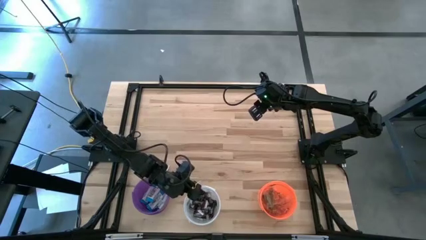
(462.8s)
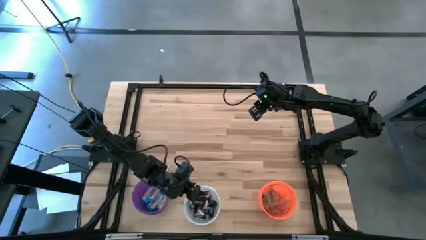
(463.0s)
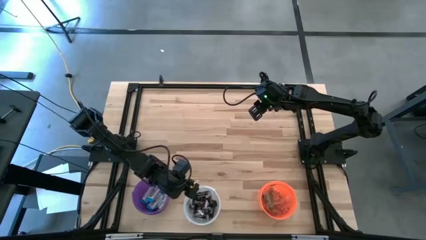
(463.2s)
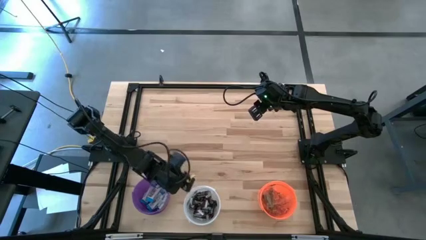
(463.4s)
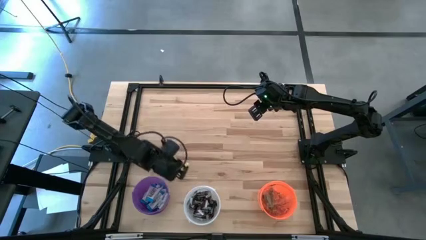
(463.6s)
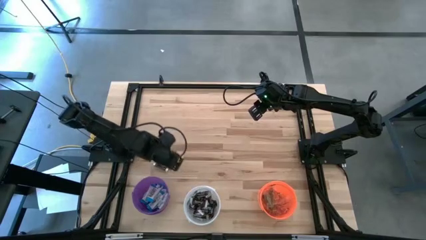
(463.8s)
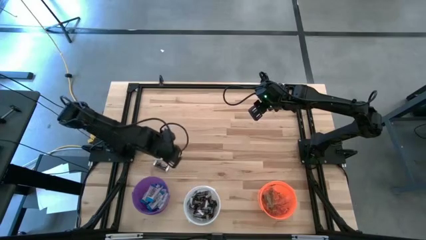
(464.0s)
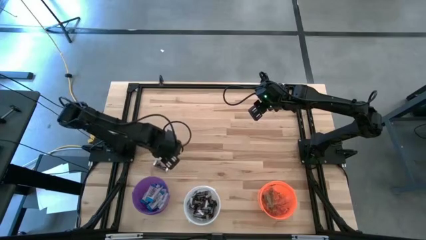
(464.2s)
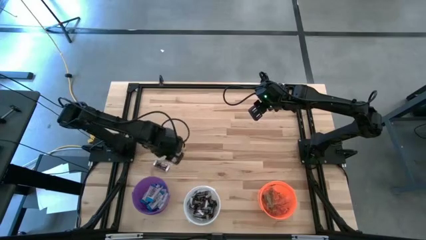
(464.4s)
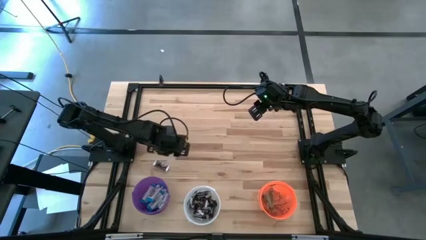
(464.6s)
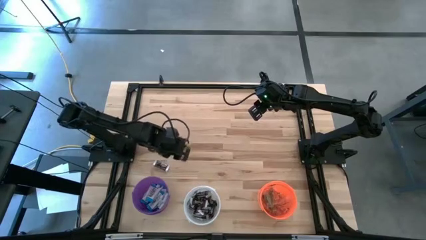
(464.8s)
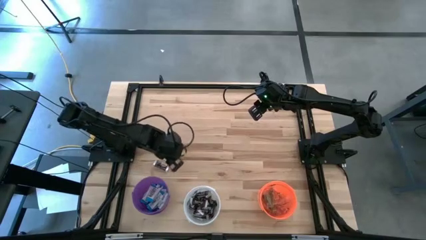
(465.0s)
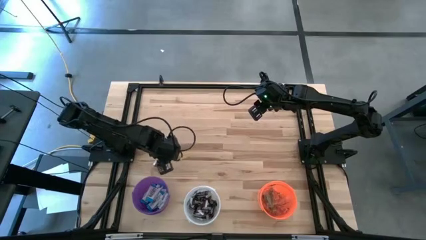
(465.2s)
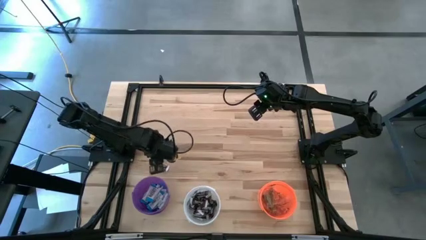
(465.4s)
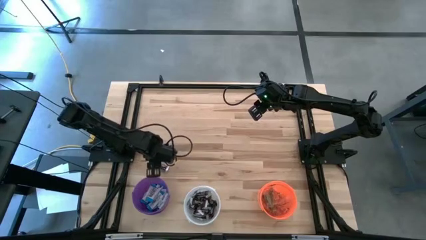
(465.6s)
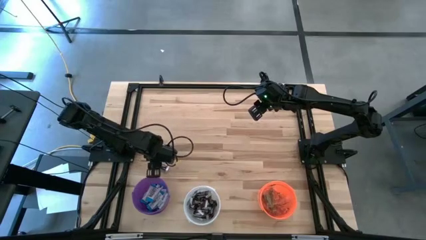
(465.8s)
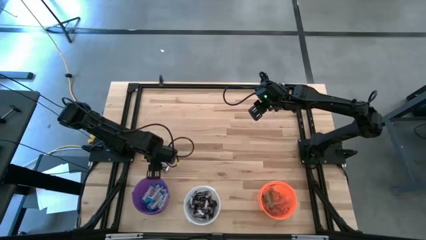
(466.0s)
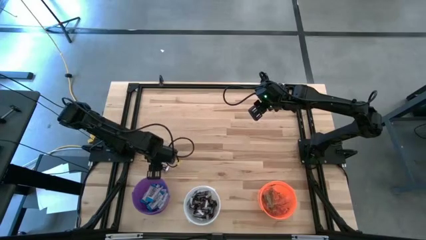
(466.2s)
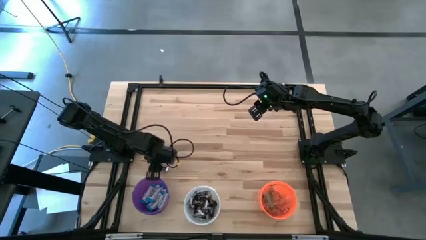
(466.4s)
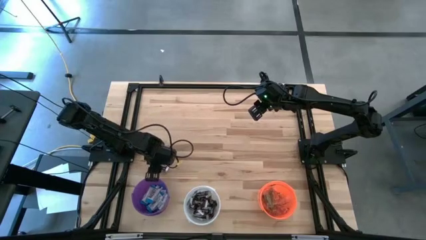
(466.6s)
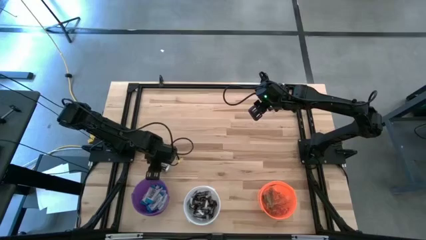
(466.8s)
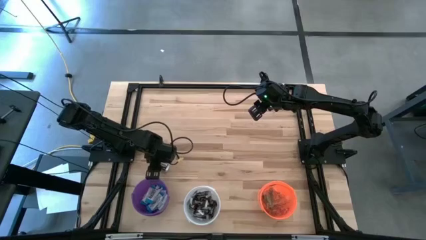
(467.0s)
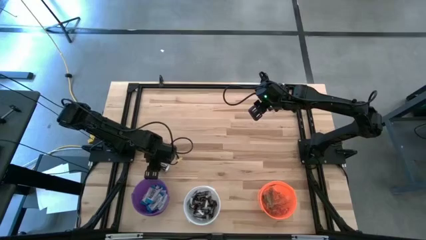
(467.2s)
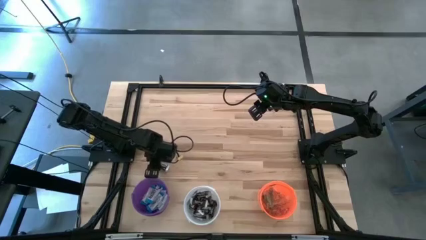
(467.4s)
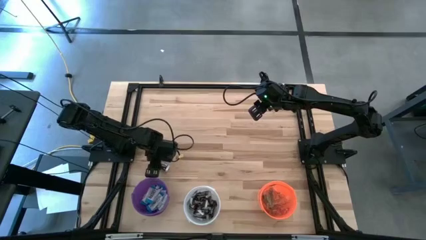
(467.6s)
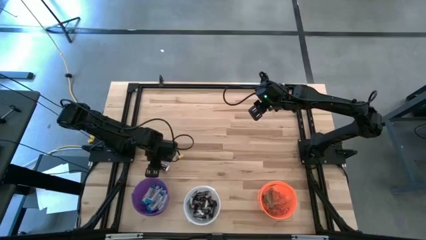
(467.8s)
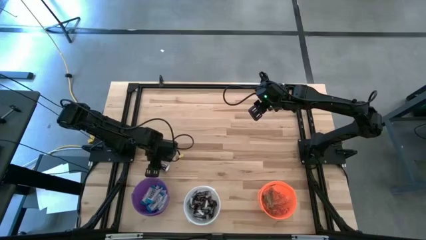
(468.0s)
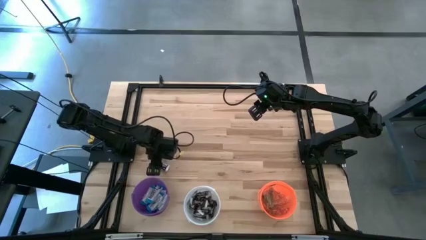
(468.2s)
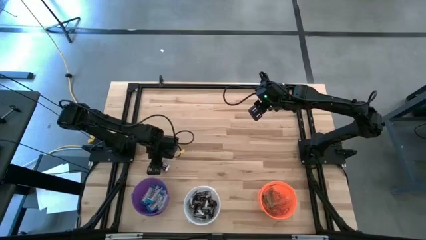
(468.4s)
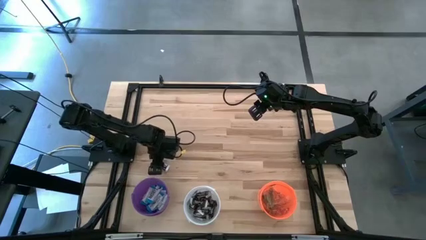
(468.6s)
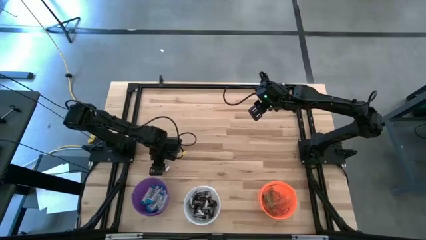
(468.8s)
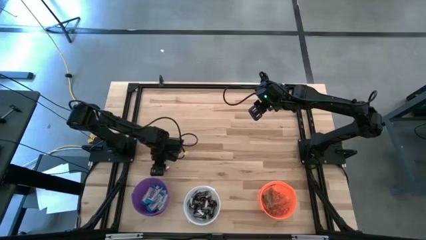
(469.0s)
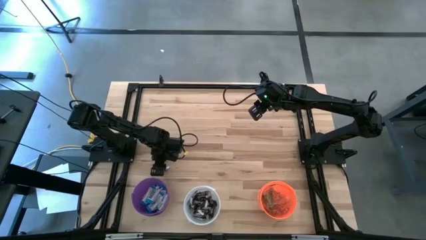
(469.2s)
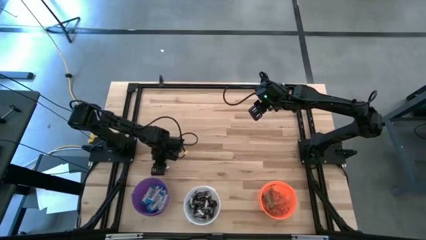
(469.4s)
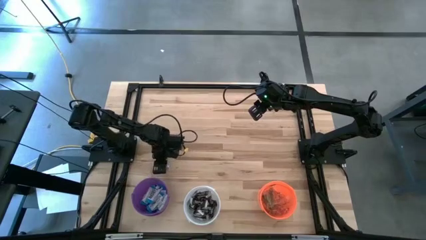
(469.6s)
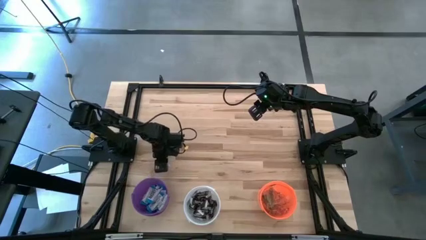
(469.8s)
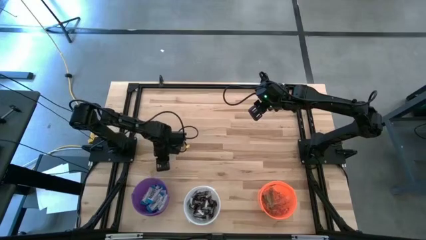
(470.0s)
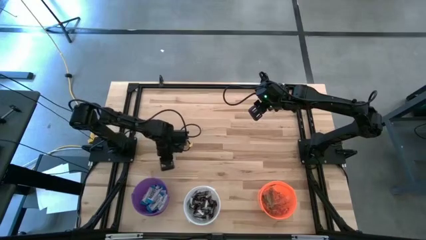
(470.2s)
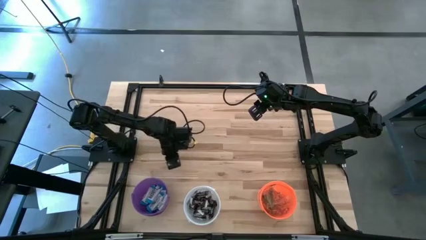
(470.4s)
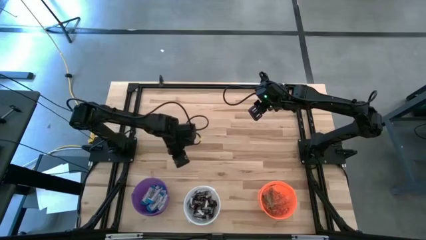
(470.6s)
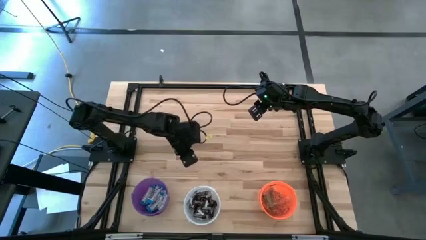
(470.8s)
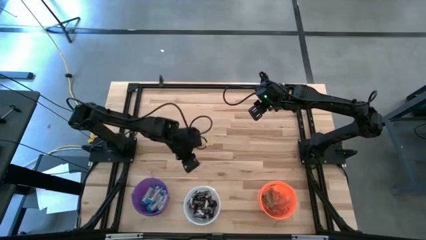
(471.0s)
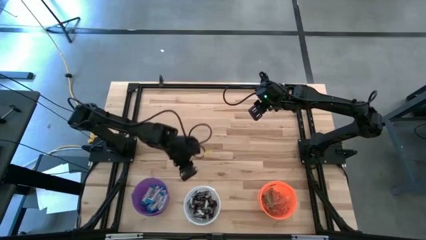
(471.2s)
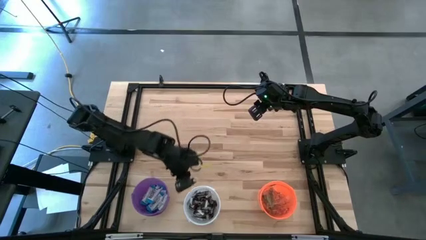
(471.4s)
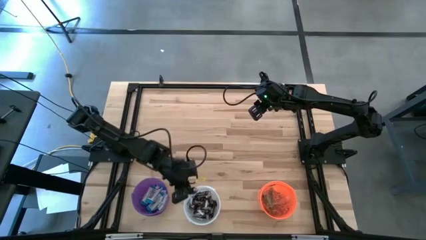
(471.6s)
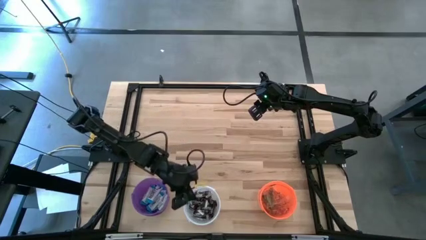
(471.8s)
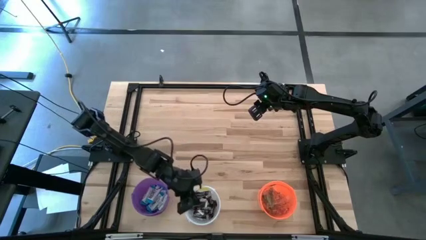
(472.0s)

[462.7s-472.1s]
Task: Sort candy
Put the brown chocolate into the white bucket

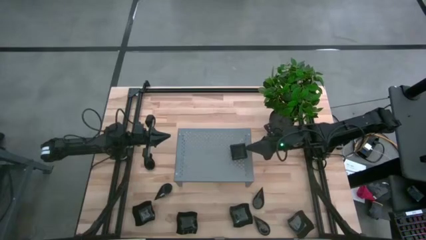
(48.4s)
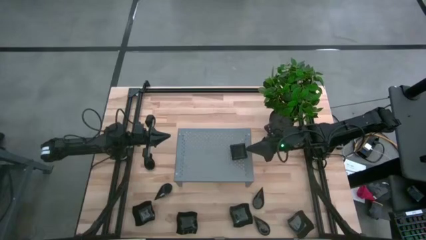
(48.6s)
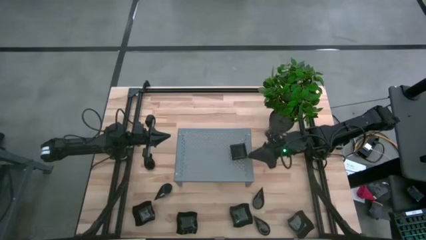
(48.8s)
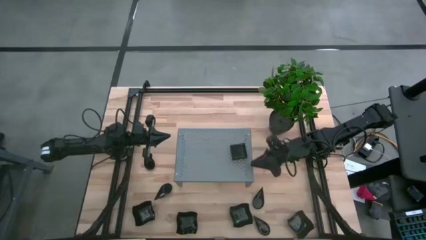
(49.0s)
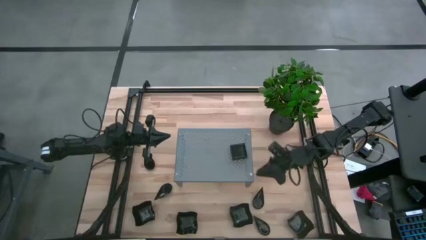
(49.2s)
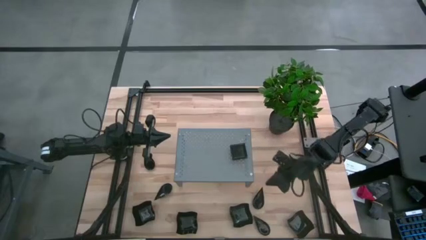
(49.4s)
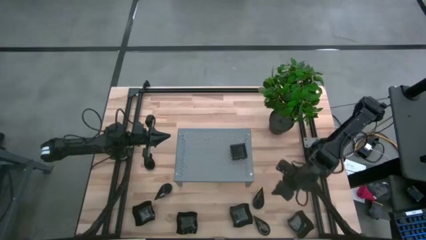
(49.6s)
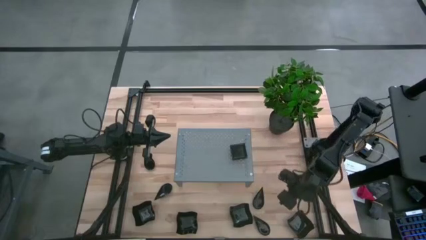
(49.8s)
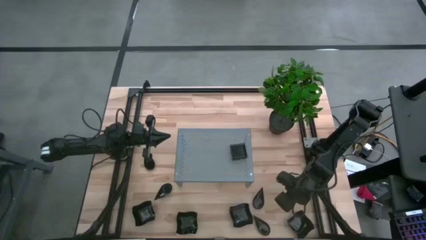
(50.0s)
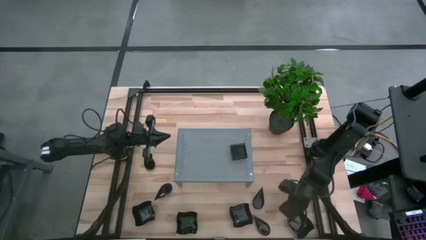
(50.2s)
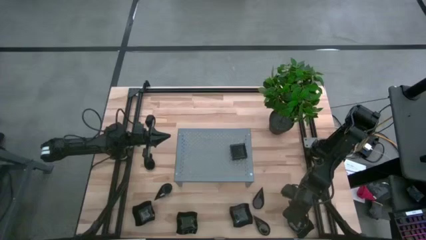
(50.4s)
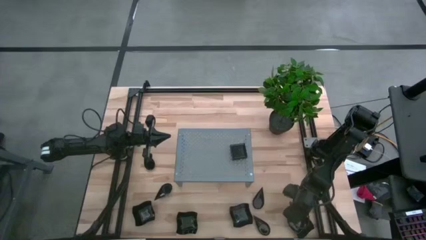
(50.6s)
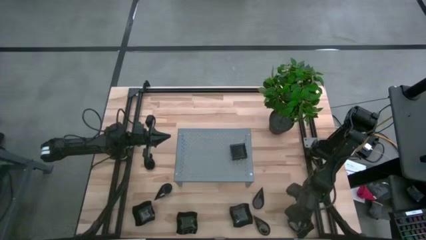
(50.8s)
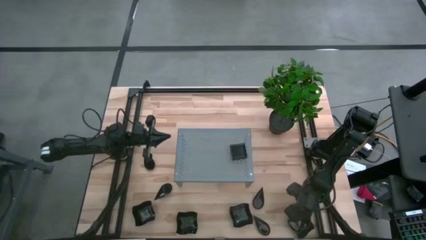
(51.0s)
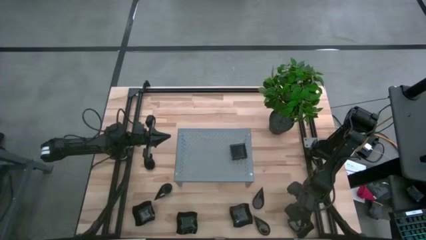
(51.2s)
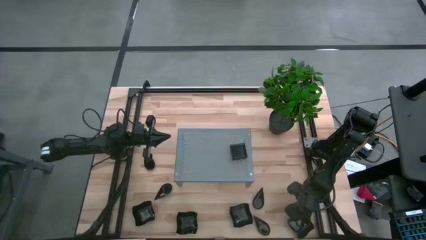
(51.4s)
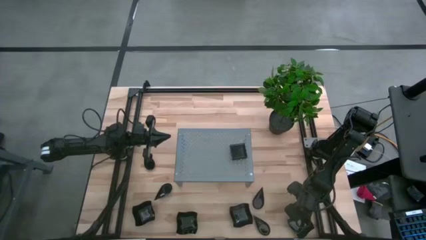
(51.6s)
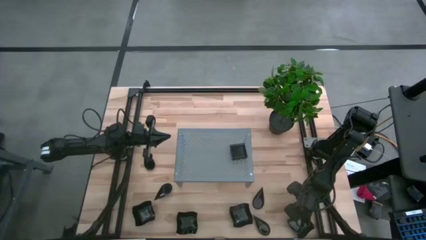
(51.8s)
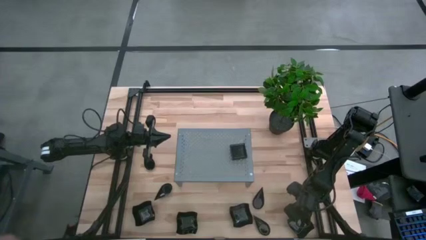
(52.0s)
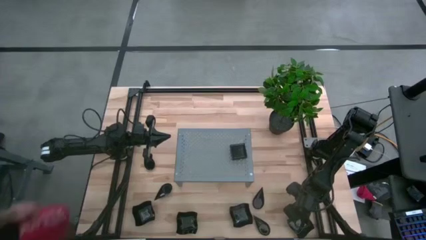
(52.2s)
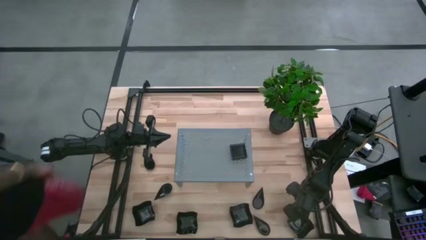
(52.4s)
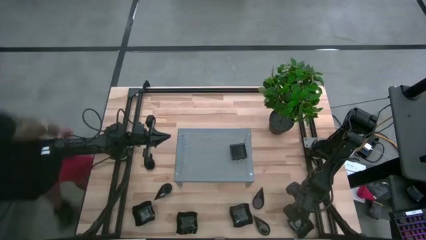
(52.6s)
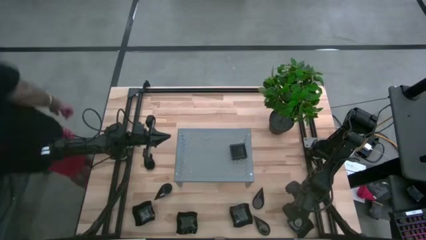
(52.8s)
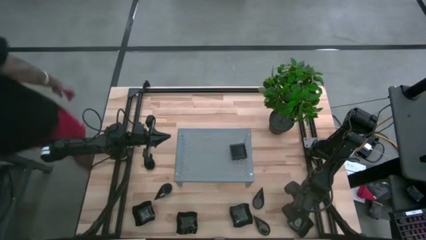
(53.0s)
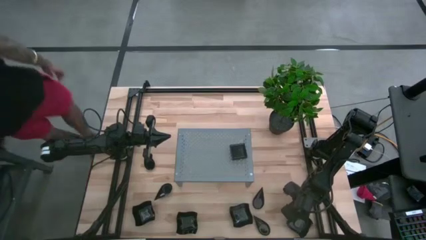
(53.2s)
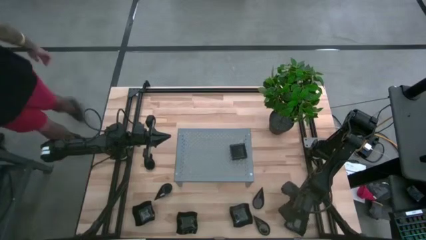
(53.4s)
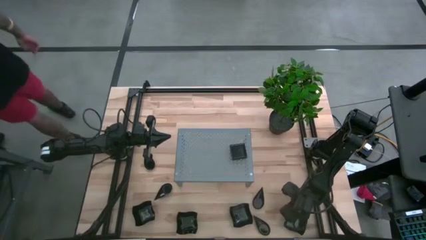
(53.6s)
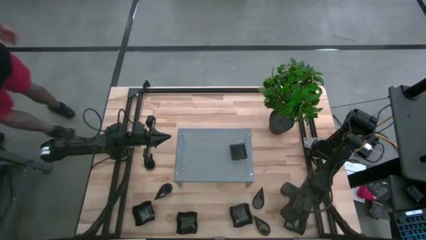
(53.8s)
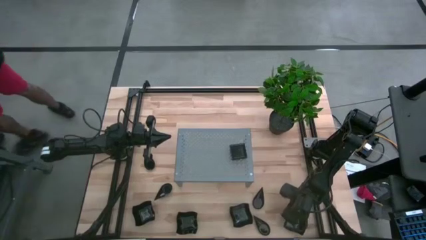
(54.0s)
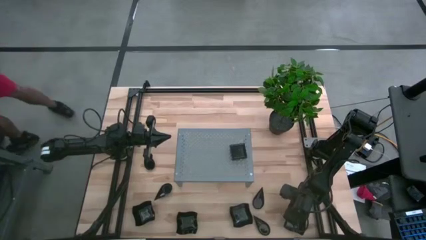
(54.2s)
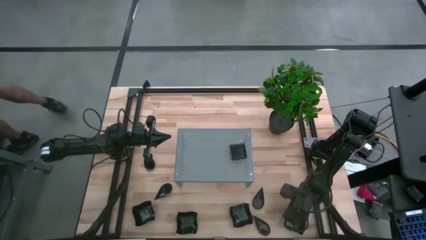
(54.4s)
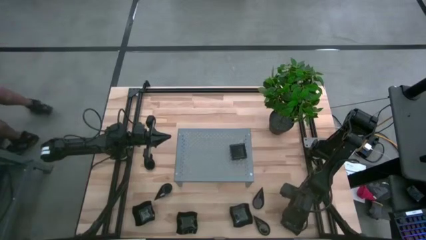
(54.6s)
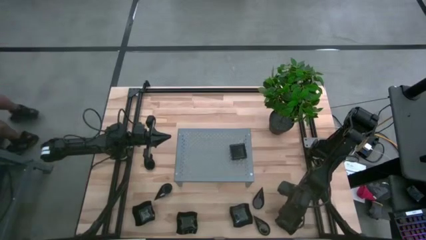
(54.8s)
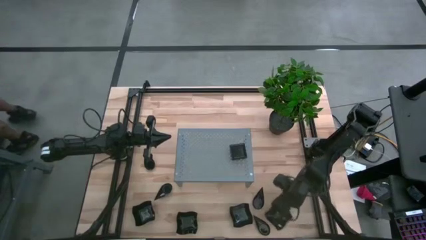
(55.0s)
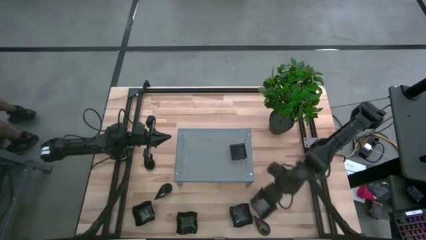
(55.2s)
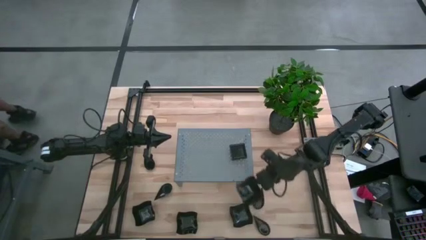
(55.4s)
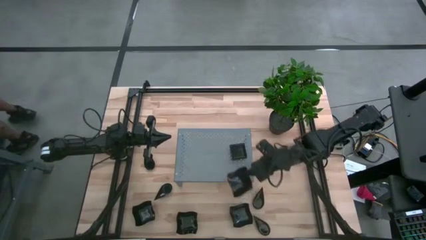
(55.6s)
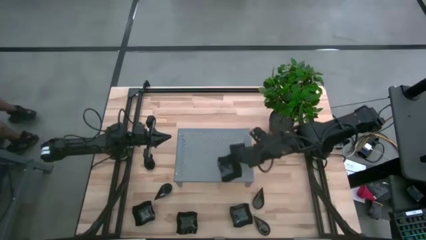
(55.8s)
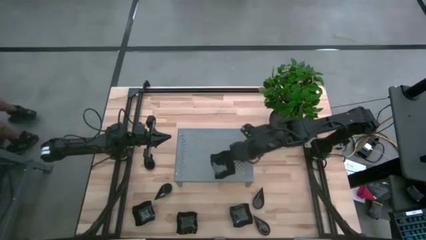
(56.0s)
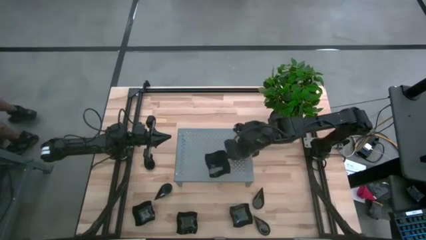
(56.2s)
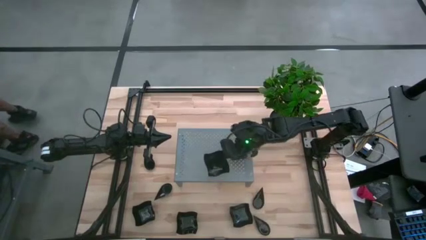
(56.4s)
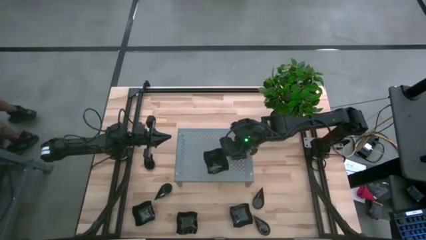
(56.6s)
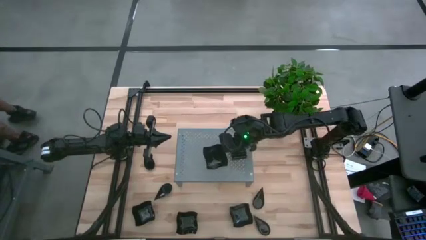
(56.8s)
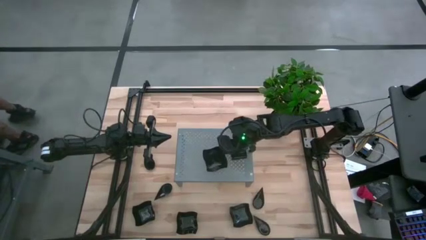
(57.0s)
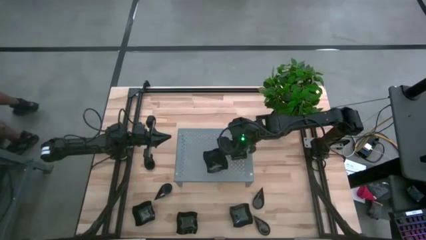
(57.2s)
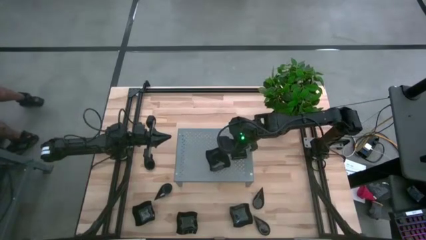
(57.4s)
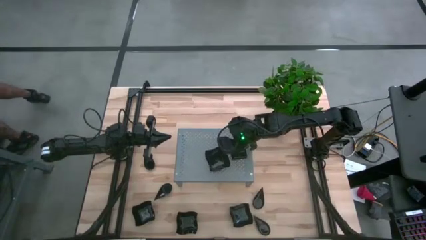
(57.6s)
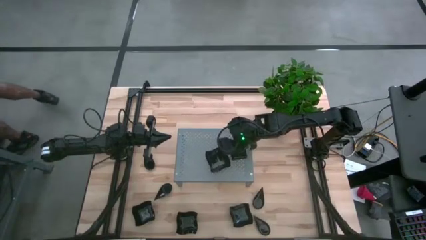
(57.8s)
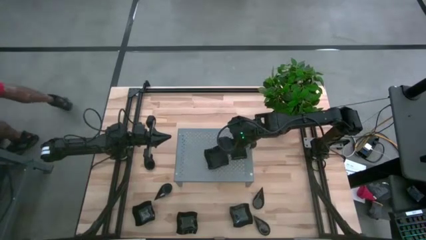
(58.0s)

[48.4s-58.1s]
Task: Pick & Place Mini shaped plates
Put the black distorted plate on the shelf
